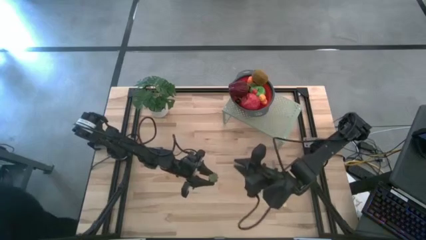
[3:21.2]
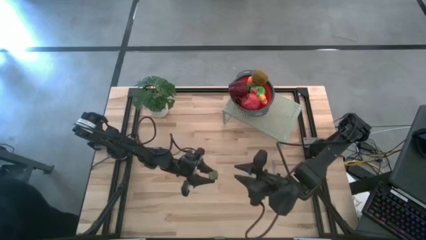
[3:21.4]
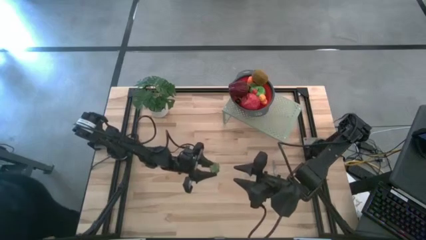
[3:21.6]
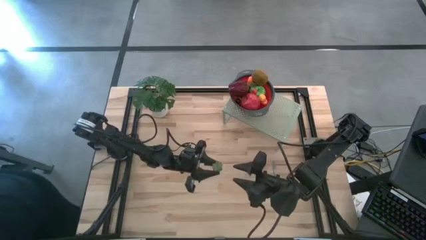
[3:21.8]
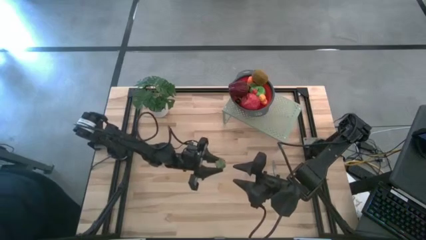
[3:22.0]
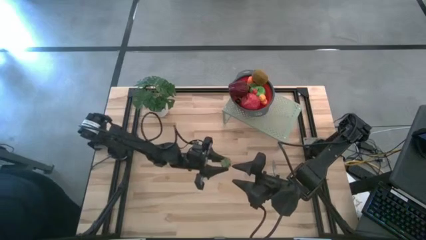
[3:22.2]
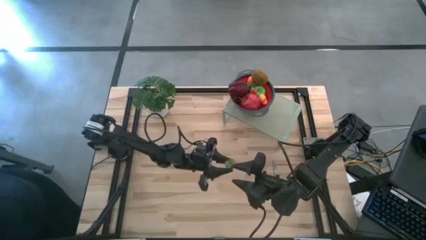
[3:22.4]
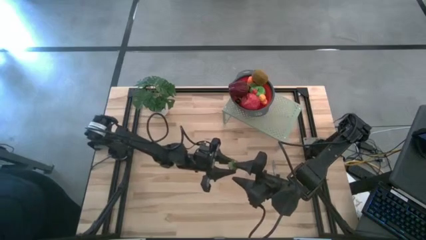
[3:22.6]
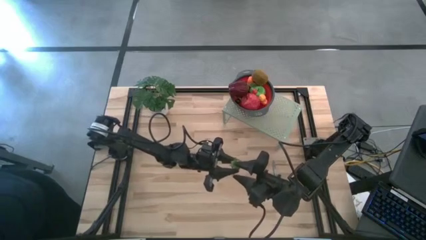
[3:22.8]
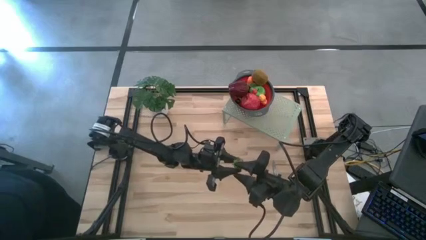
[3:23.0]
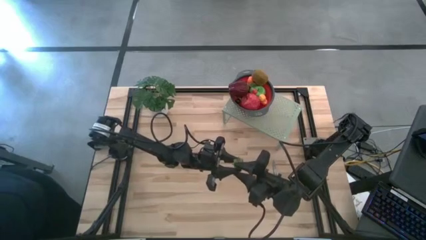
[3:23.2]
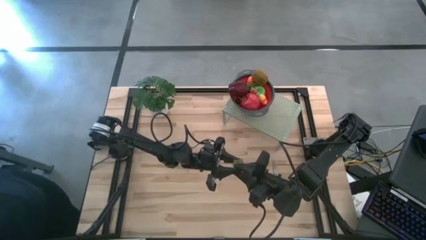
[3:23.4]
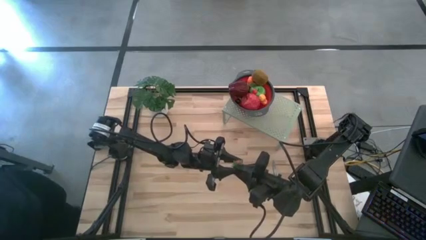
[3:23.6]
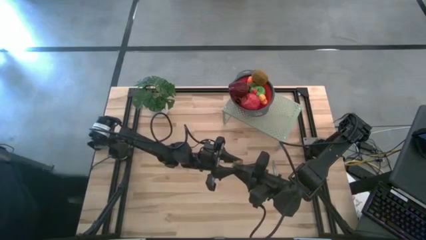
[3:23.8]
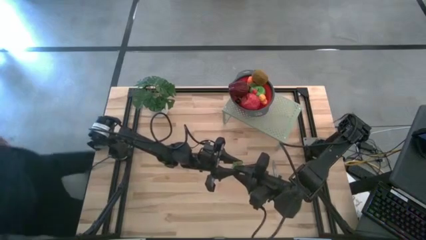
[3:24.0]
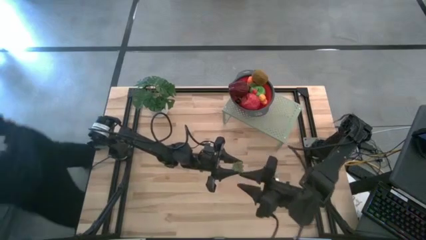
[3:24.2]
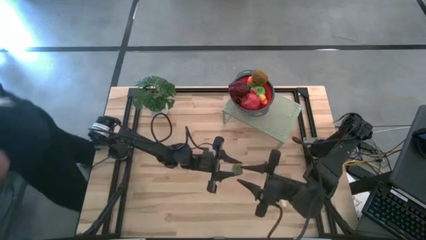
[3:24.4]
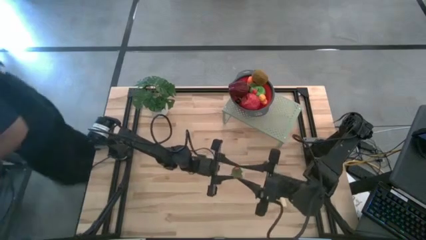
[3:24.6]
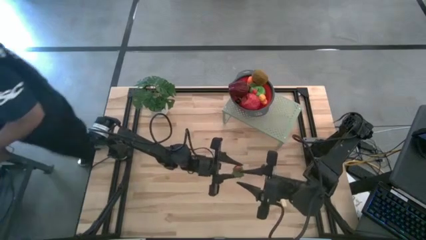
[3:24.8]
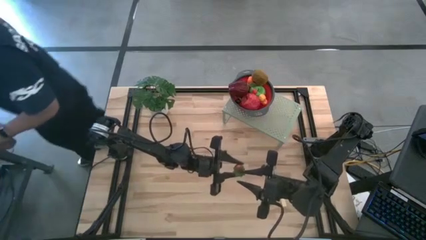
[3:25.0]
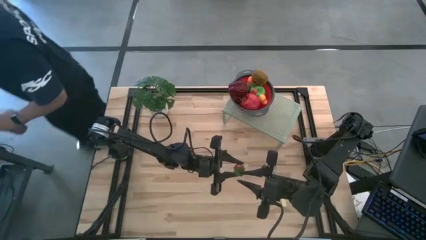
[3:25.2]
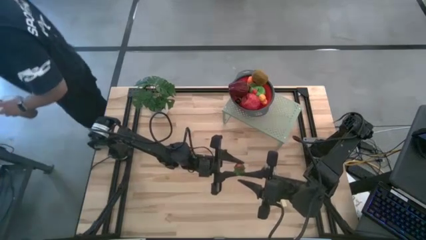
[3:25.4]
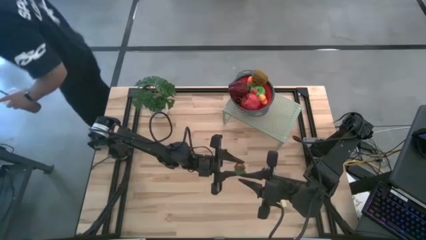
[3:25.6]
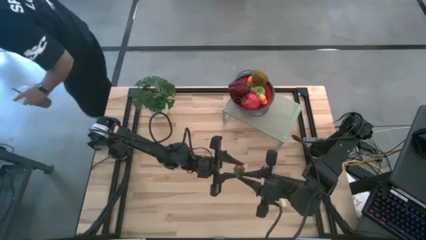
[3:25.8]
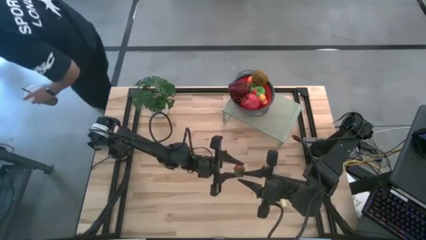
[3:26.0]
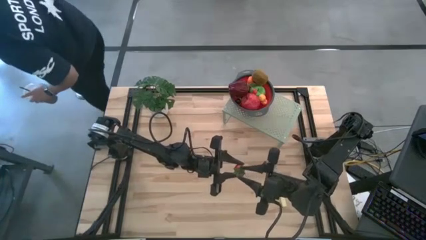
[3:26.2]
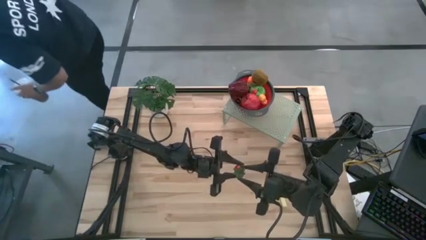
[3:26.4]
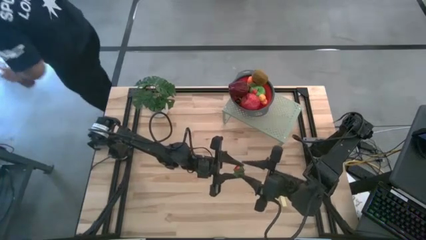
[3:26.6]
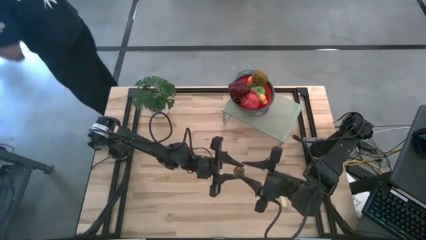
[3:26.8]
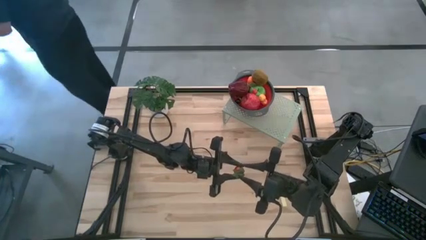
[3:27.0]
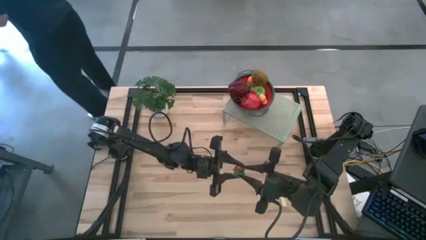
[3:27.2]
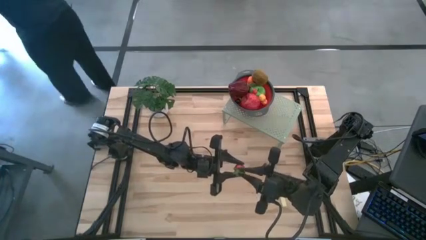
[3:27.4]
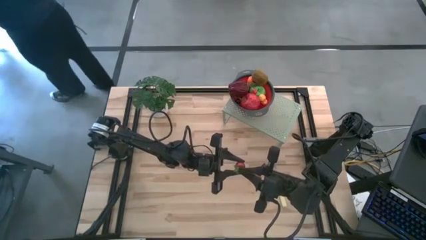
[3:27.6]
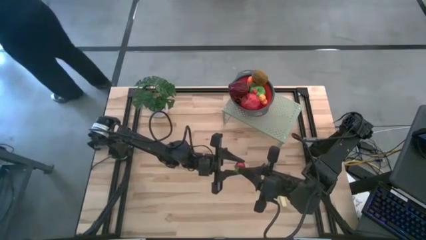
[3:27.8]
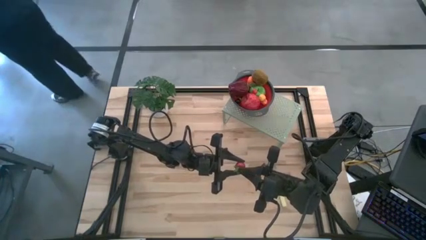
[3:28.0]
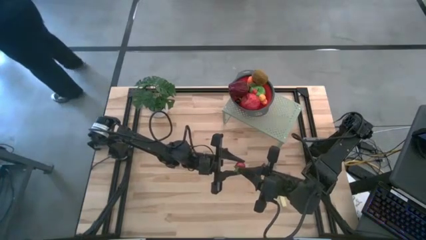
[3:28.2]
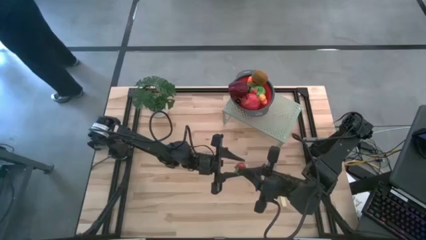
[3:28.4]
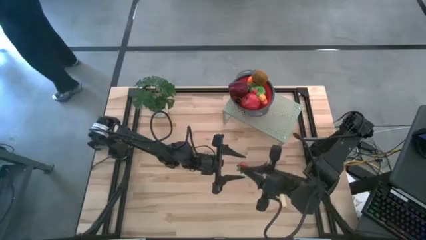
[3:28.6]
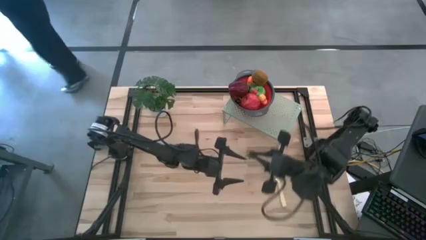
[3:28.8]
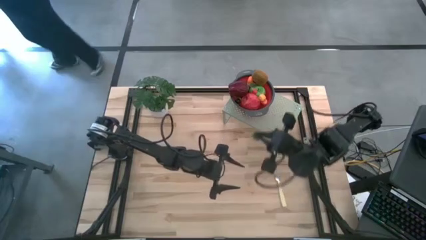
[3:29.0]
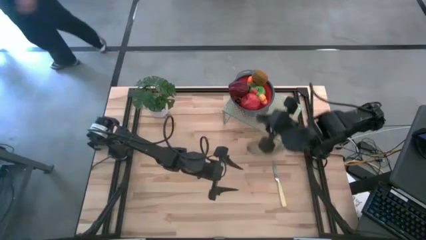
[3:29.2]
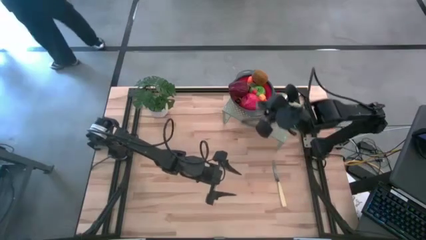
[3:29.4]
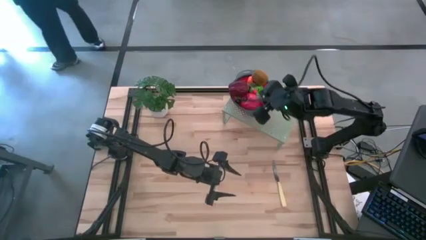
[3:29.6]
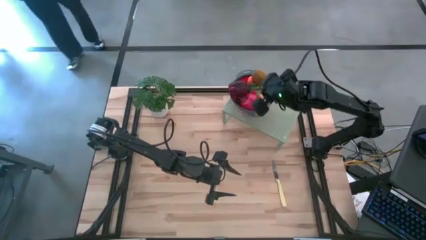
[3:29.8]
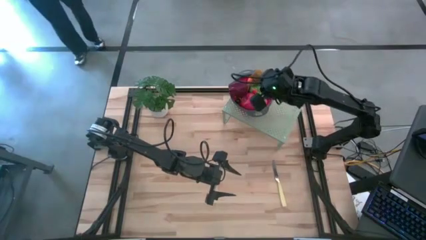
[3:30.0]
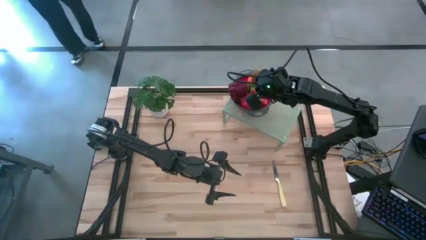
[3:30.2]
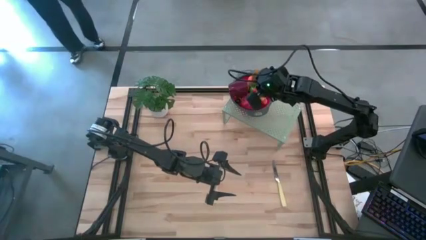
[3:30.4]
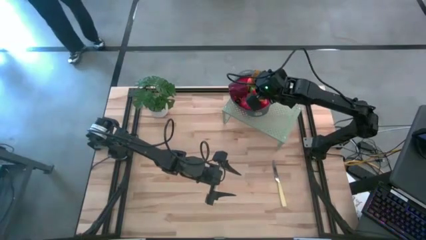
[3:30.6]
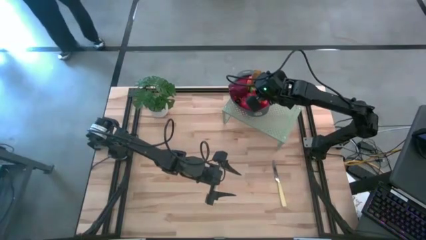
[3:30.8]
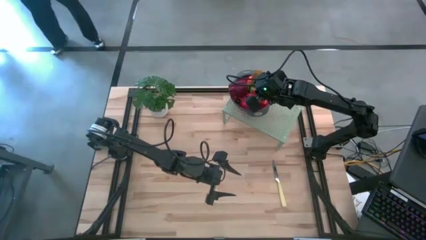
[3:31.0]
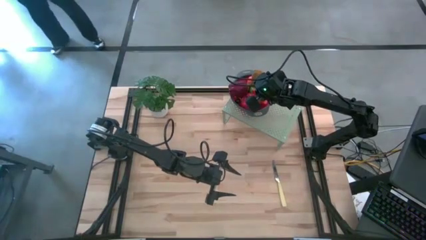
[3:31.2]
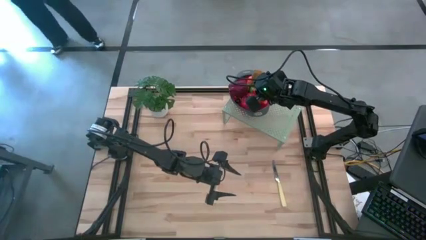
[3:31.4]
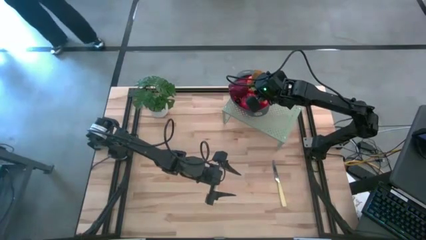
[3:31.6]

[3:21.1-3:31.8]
Task: Pick & Place Fruit
Put the red strawberry into the red strainer bowl

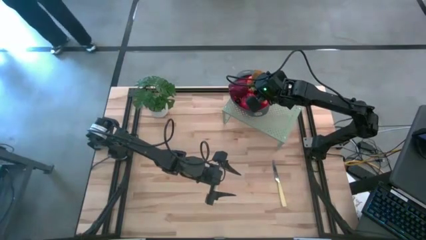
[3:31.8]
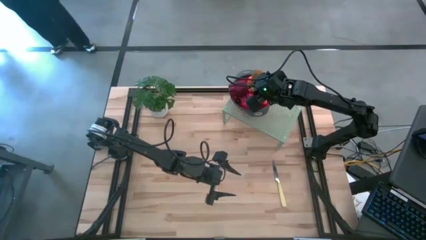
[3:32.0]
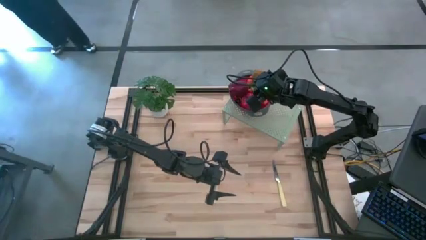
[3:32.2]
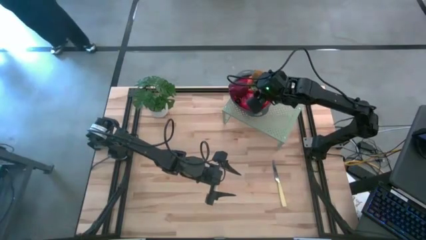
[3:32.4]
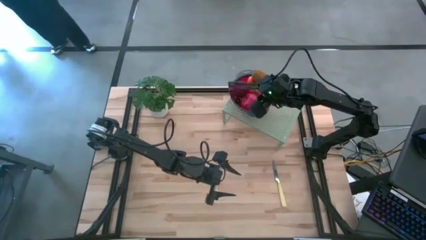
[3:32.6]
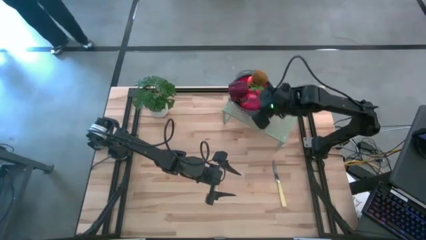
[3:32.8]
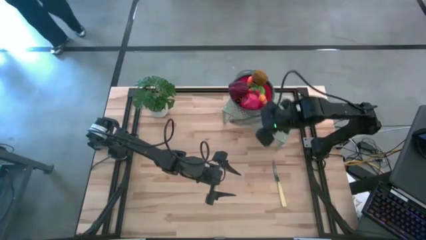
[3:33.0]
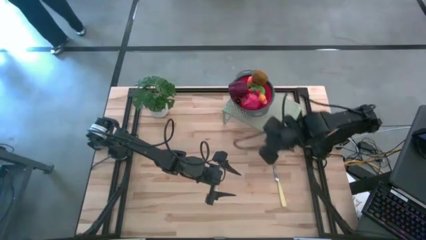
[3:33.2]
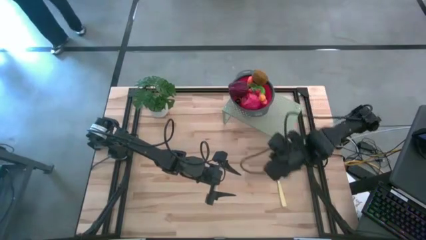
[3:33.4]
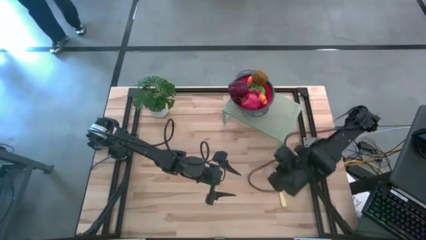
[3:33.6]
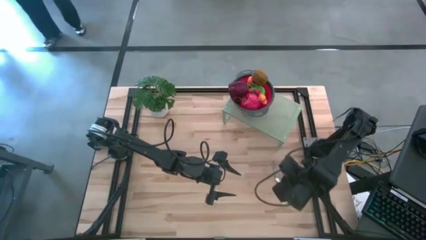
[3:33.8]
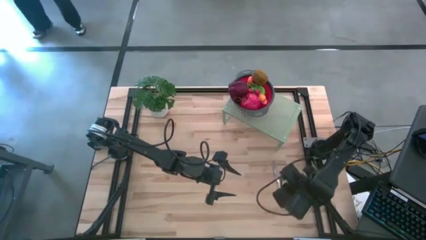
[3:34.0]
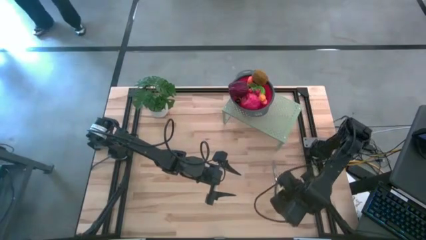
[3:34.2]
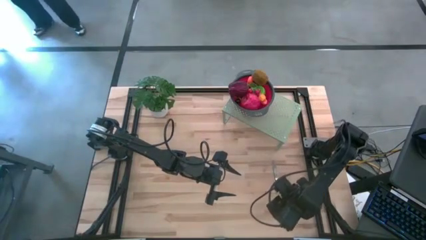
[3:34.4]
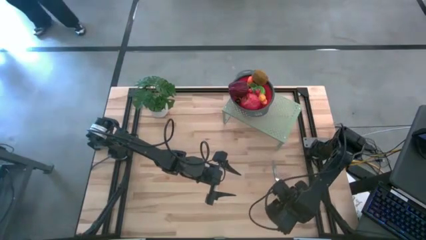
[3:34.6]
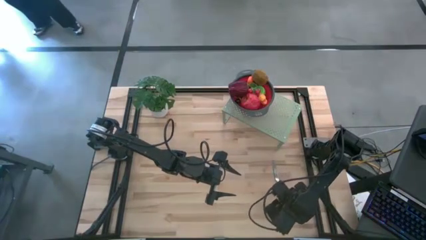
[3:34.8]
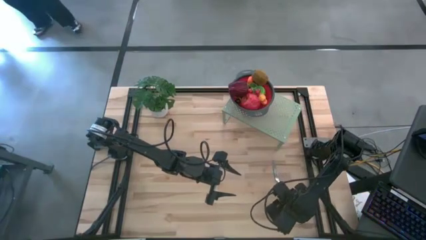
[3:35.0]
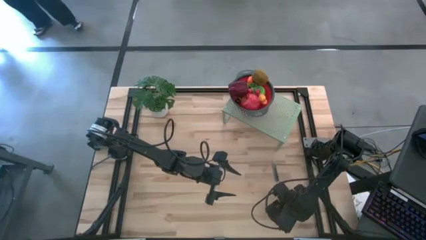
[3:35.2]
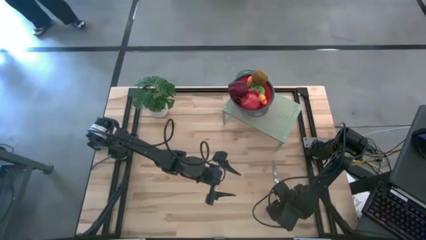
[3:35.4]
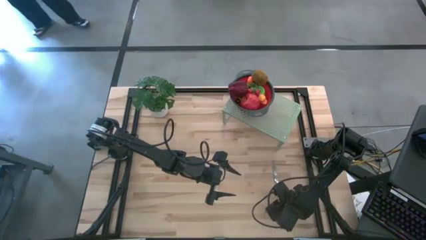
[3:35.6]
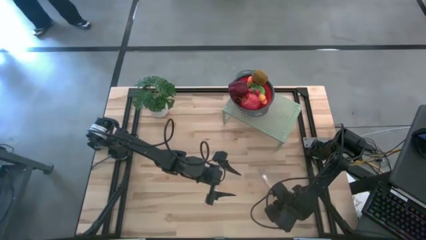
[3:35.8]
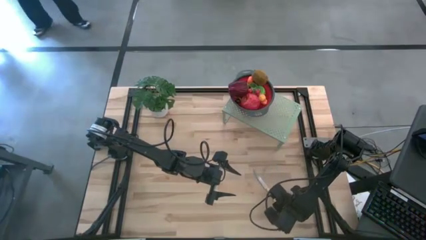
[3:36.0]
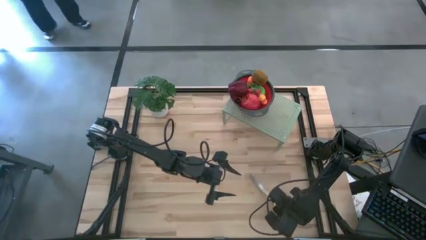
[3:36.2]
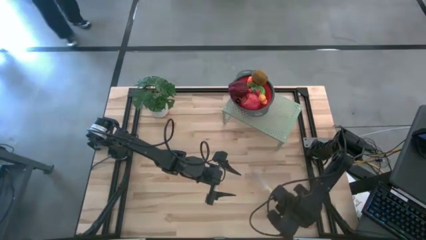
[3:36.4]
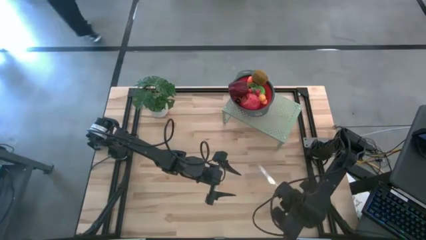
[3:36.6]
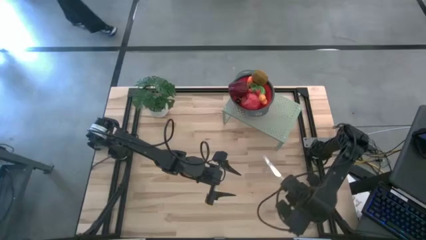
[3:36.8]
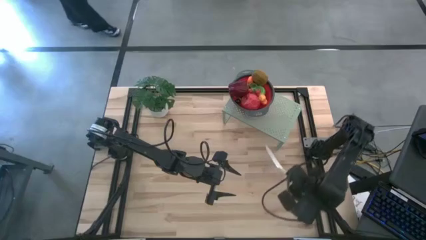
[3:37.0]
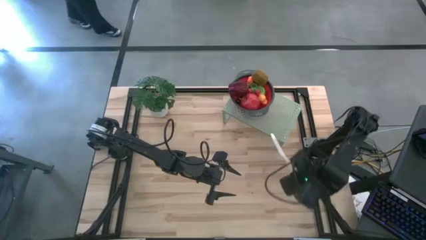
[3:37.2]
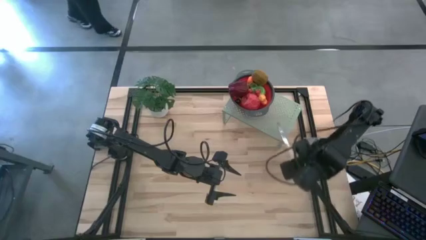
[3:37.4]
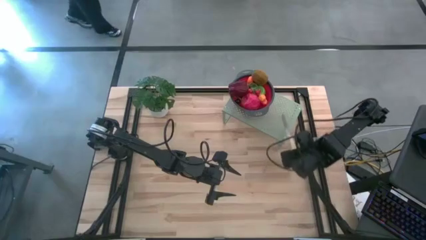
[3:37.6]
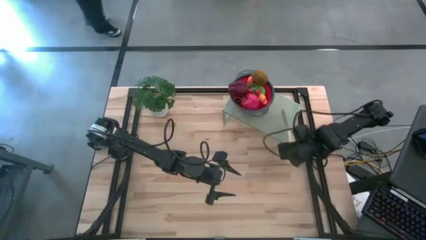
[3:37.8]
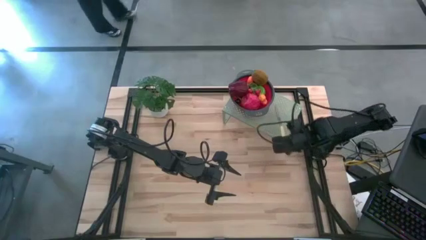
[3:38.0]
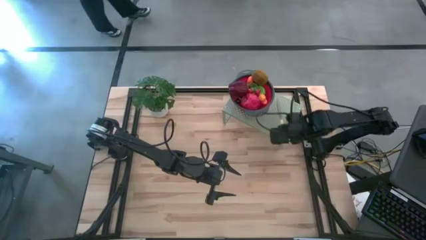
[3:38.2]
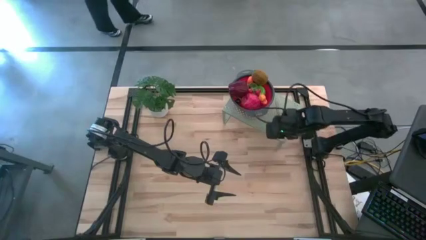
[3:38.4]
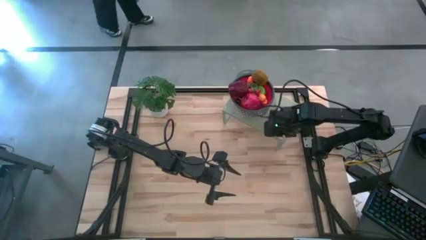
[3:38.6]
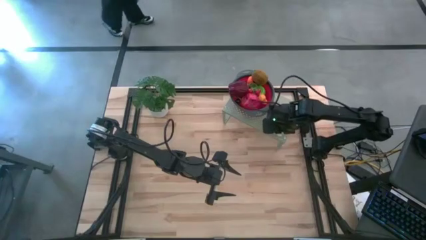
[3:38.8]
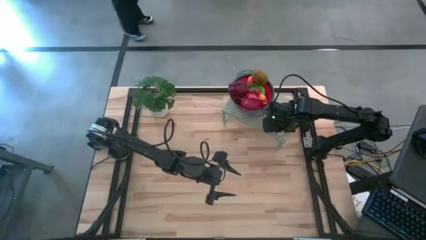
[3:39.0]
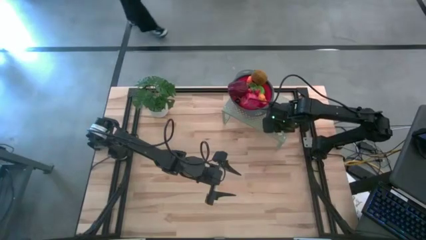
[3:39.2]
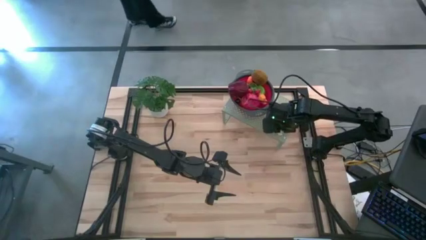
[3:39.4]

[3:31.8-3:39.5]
Put the yellow knife on the shelf
